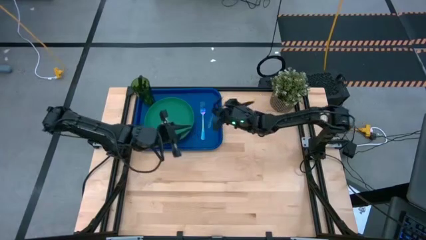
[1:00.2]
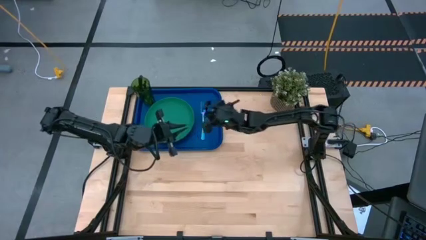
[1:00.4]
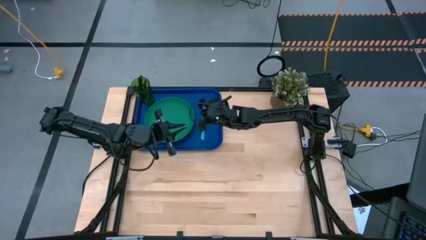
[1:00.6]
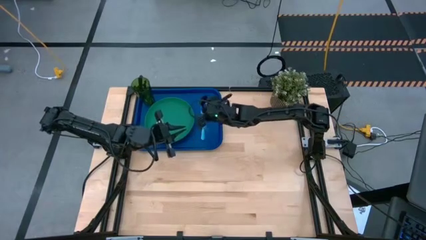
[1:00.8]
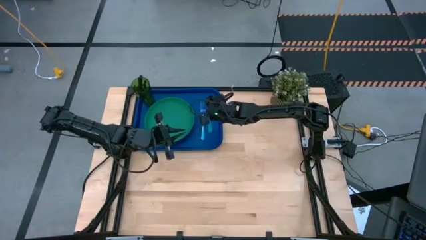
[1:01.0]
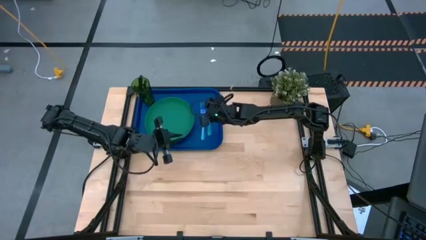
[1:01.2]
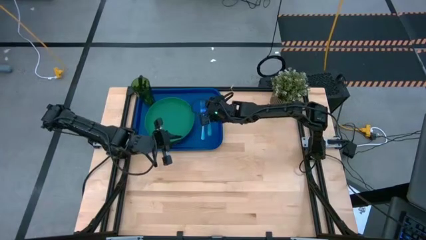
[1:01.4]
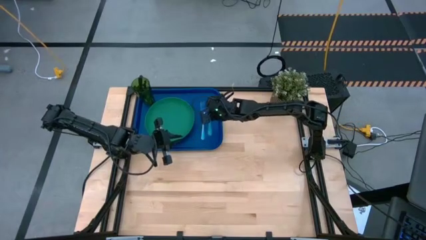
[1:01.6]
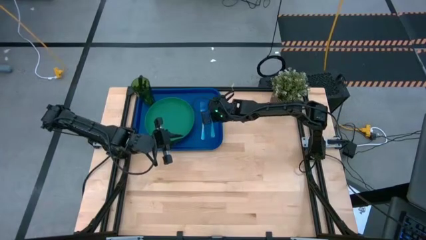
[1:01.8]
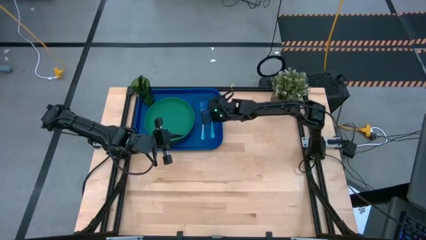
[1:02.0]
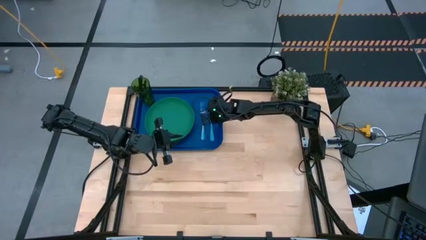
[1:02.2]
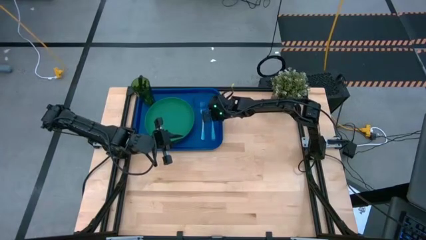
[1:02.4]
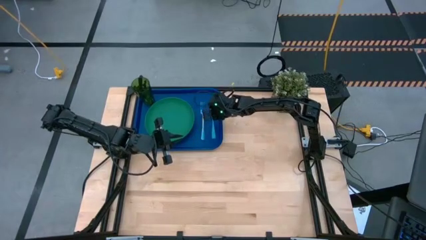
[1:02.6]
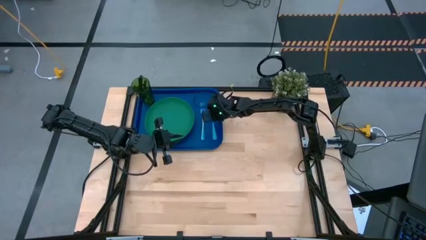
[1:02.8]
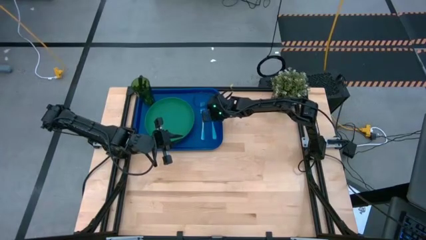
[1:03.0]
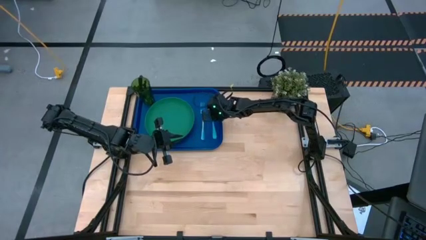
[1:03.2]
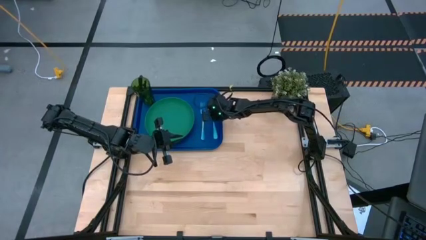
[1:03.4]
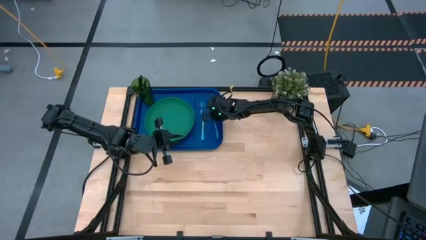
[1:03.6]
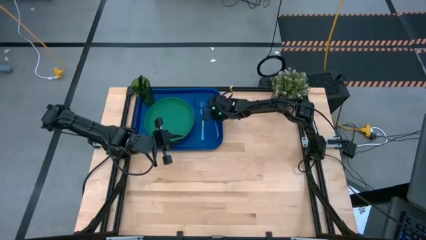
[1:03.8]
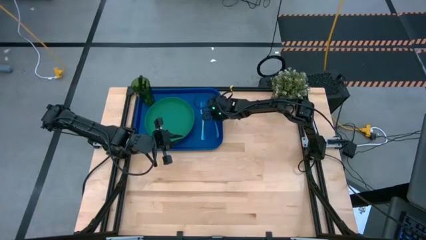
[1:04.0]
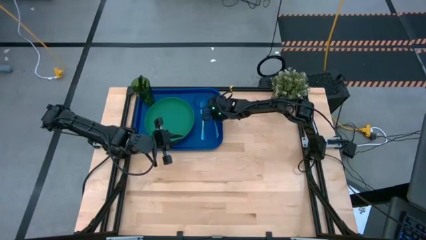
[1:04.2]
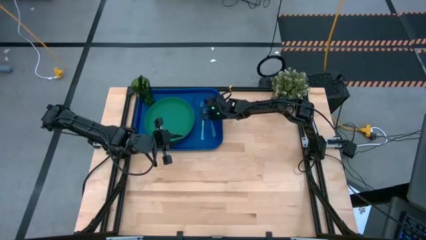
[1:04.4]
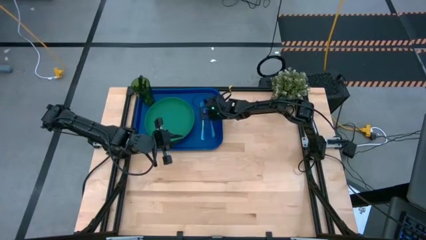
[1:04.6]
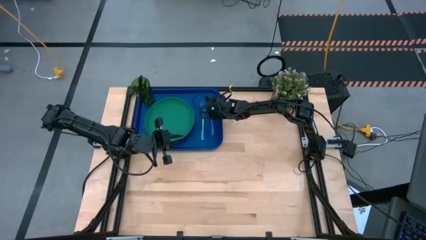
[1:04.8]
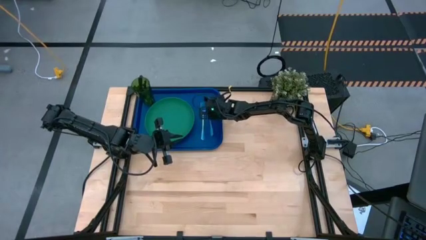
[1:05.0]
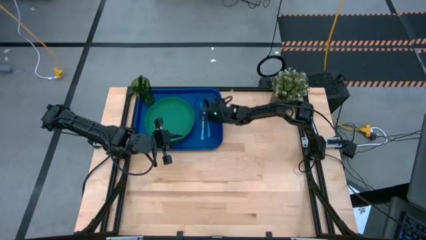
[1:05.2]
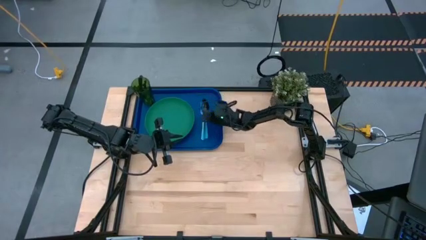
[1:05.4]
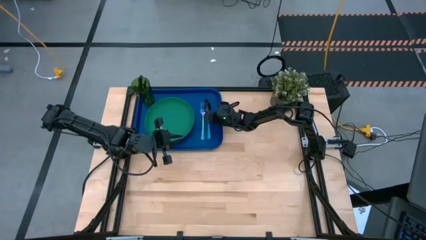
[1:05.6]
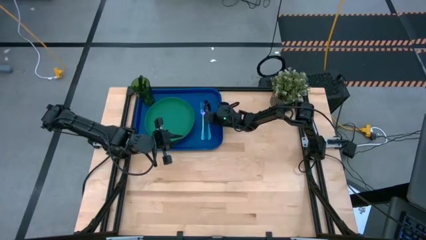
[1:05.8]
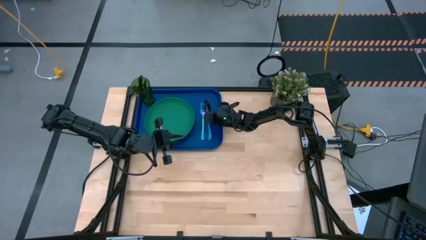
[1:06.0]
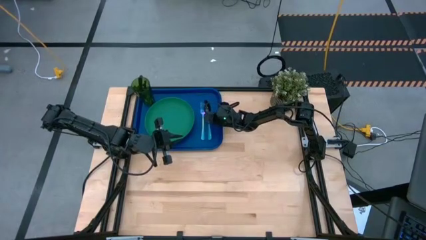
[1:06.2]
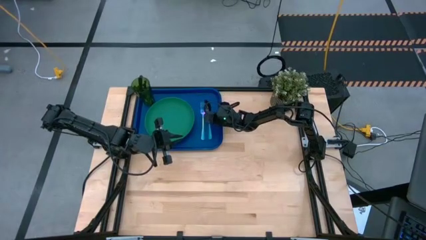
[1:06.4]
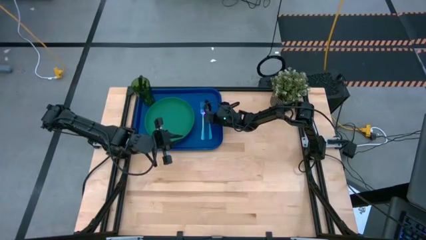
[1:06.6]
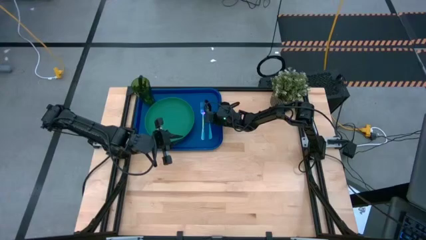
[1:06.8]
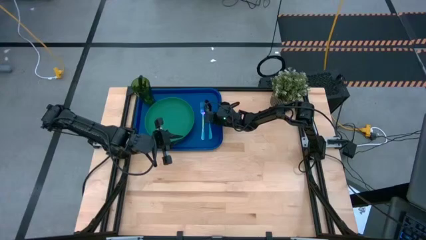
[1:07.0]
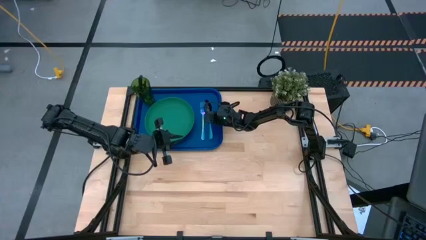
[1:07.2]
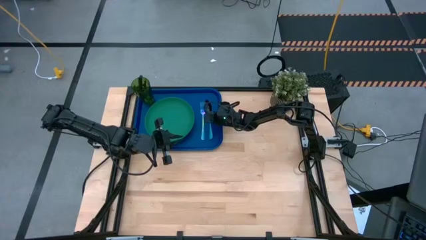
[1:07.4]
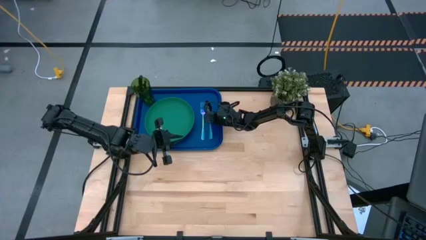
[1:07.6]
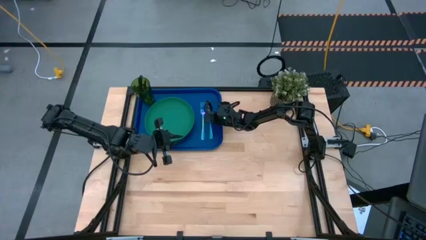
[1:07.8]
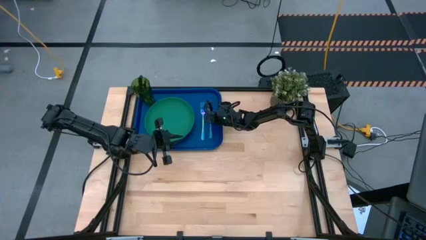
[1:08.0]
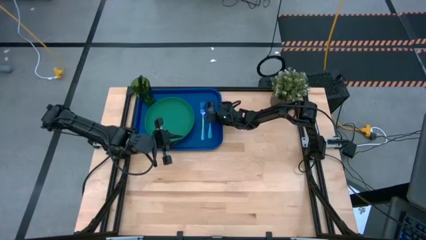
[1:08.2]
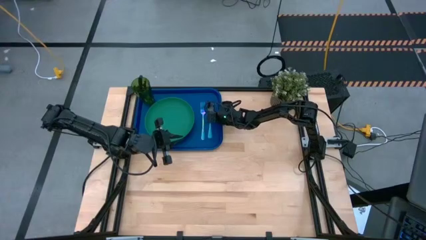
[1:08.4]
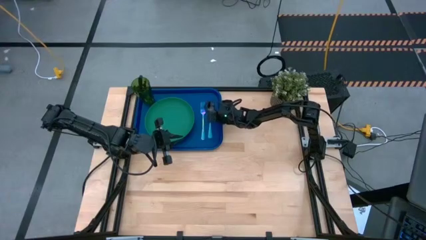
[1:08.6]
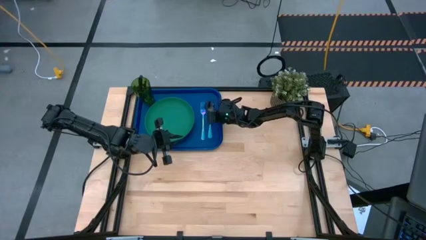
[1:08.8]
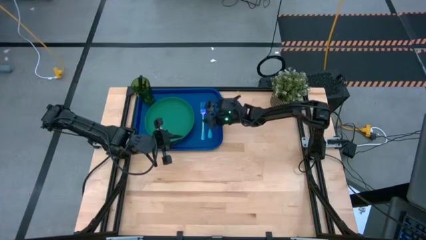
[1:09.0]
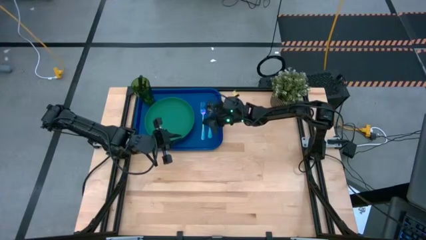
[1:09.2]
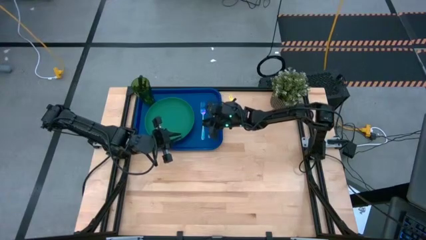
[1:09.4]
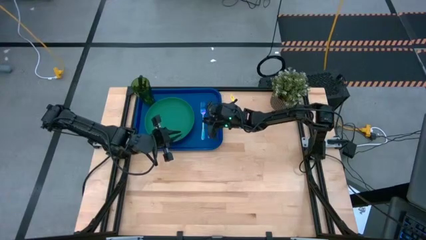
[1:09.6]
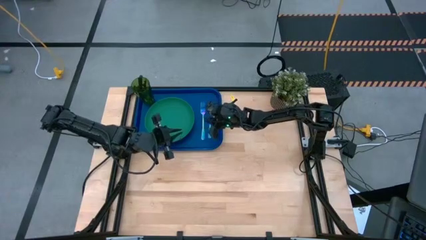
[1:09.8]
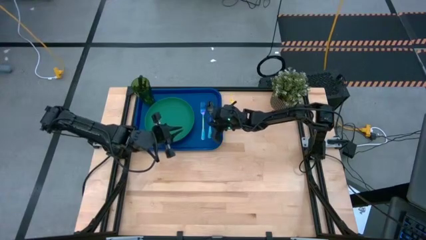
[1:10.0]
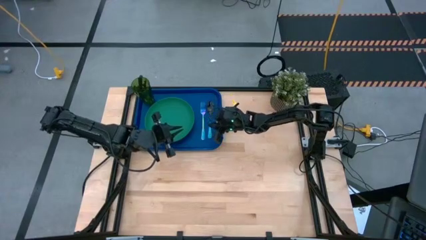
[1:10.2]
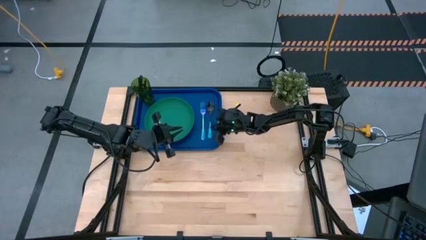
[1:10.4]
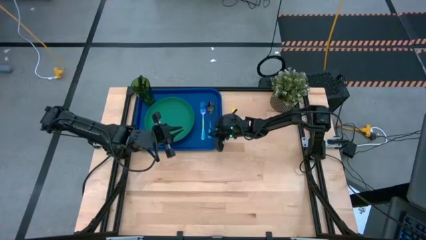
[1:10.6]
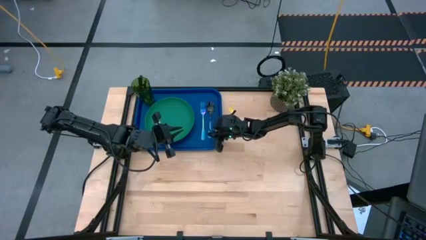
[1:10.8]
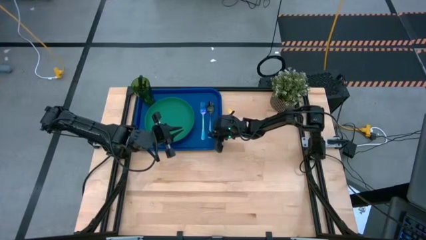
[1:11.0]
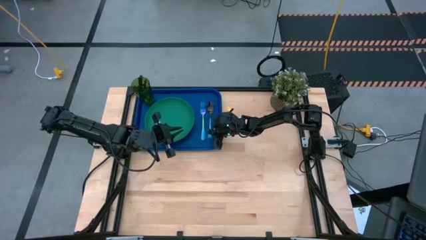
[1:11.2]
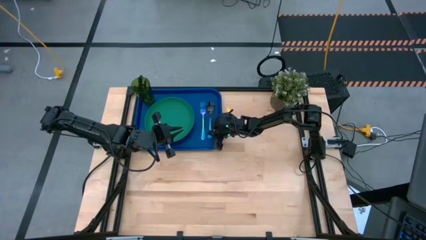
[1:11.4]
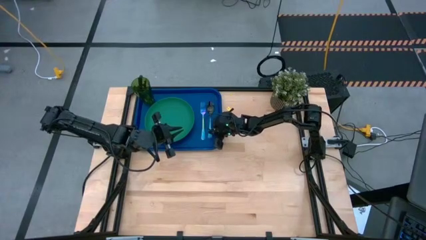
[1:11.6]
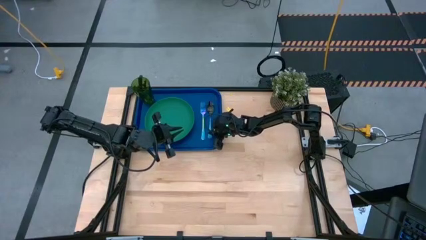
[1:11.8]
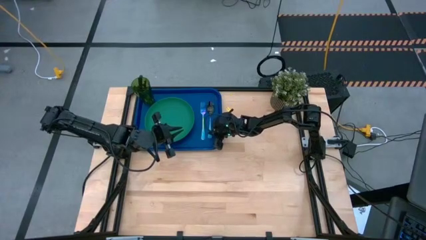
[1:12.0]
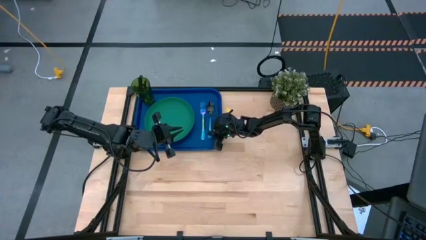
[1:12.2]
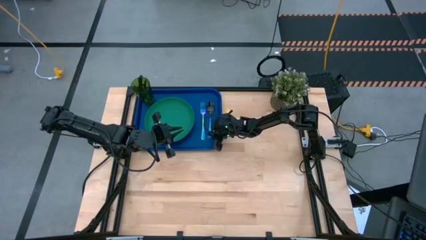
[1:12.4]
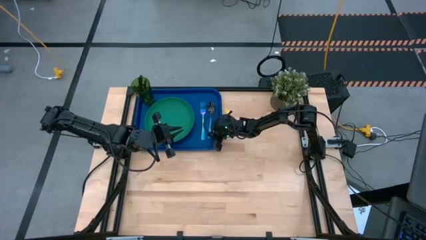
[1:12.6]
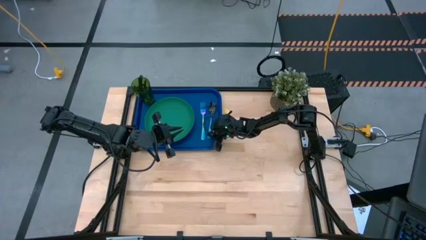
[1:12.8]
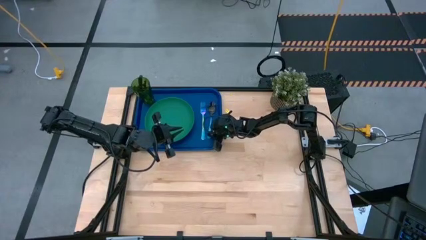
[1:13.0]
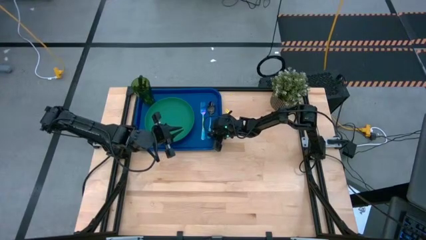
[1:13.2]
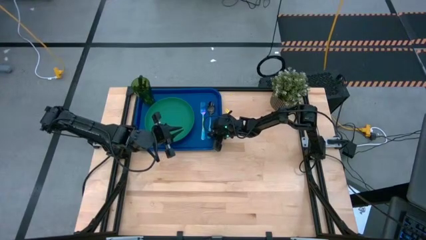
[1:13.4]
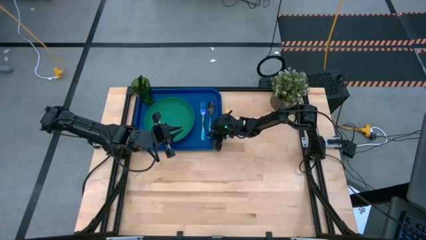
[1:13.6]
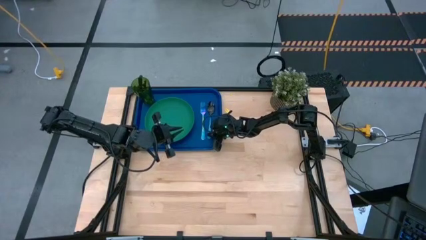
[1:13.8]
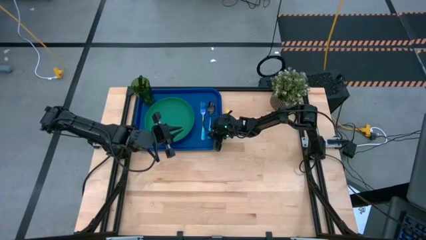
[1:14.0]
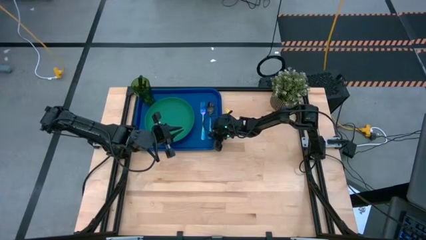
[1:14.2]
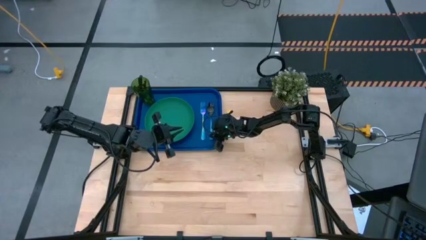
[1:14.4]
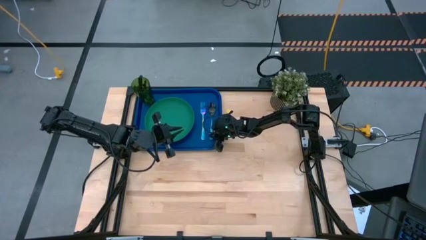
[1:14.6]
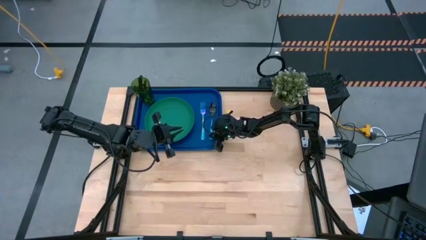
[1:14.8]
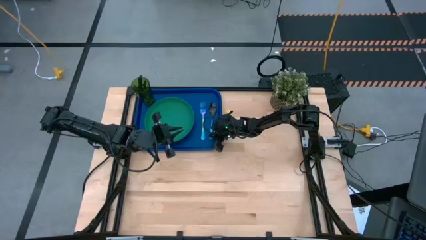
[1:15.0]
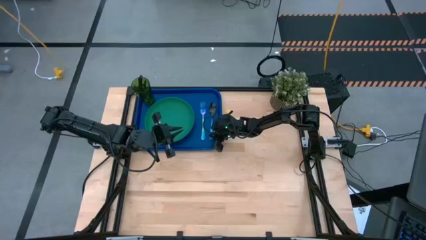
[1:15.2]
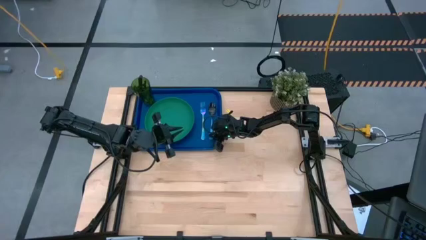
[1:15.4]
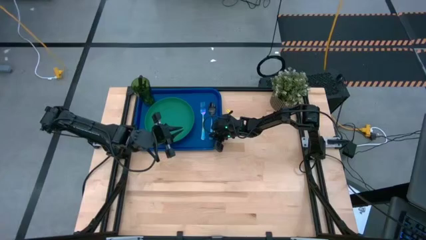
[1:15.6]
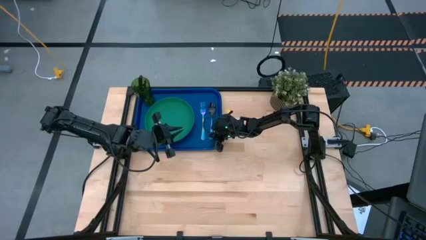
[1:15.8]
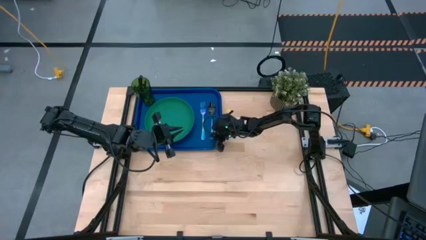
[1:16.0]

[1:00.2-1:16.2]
Task: Pick and place plate/cup/fork/spoon on tray
Put the blue spoon on the blue serving tray to the right of the blue fork
